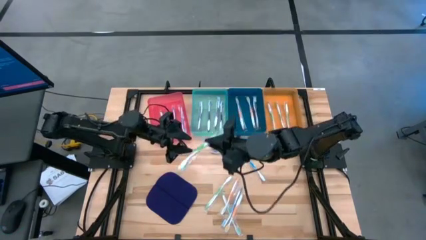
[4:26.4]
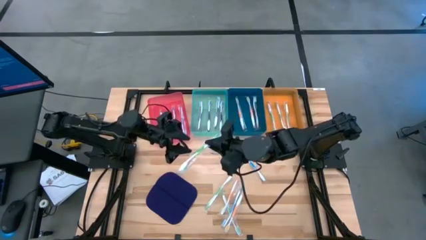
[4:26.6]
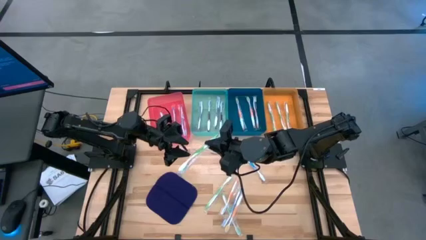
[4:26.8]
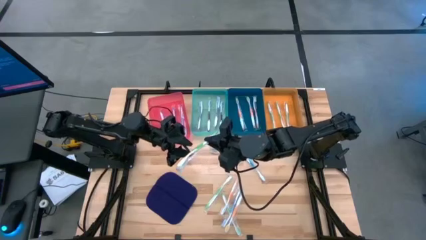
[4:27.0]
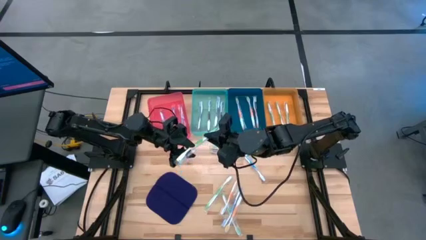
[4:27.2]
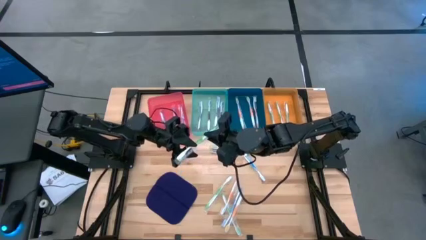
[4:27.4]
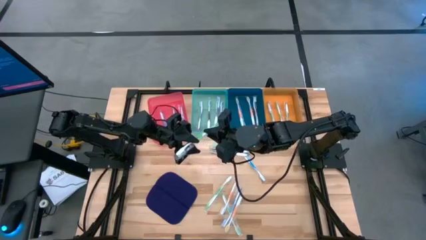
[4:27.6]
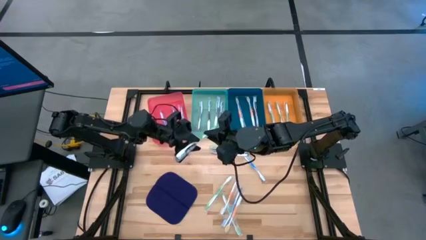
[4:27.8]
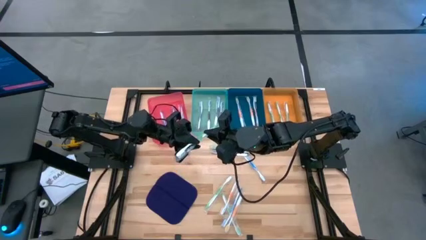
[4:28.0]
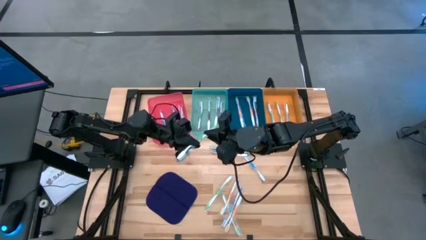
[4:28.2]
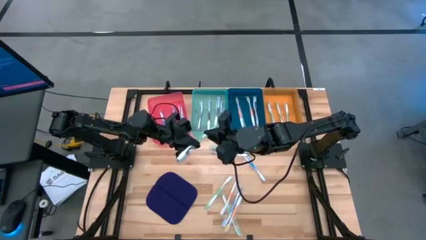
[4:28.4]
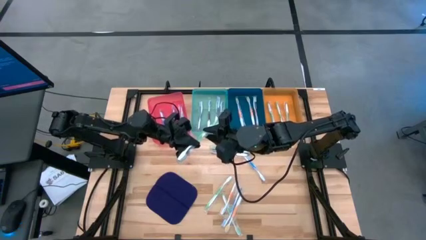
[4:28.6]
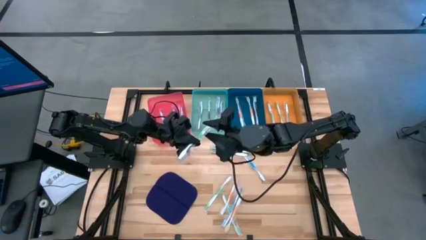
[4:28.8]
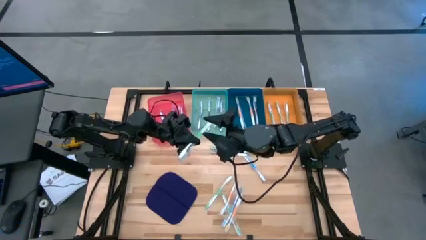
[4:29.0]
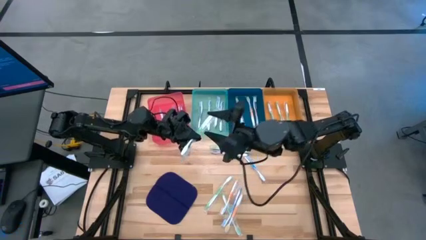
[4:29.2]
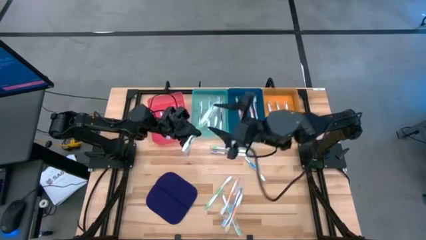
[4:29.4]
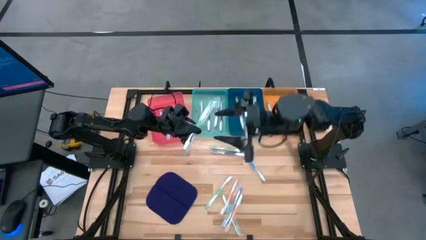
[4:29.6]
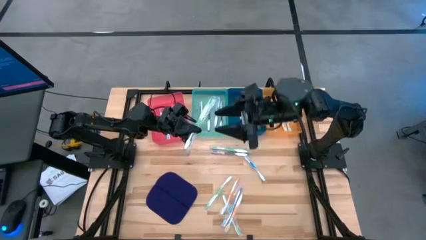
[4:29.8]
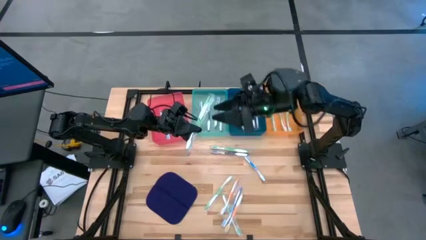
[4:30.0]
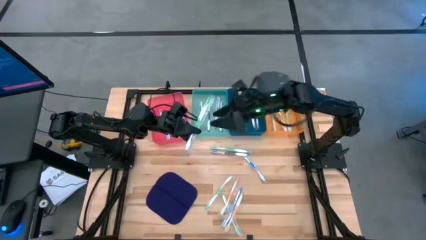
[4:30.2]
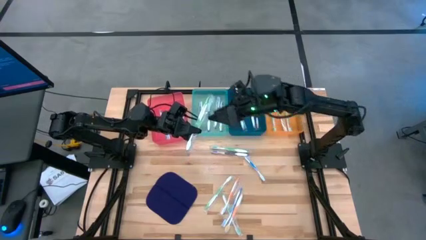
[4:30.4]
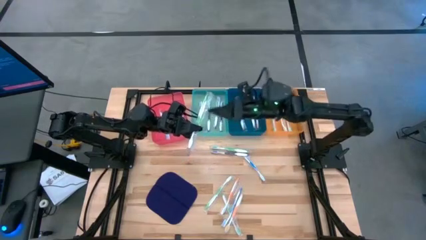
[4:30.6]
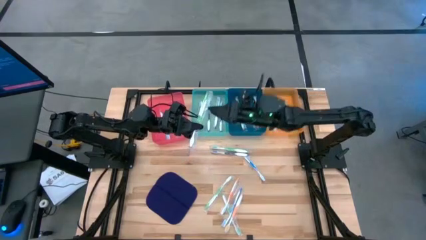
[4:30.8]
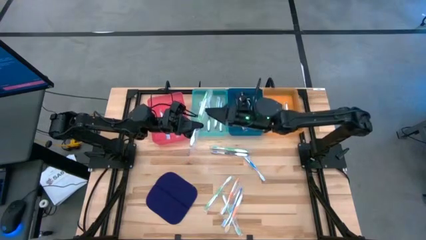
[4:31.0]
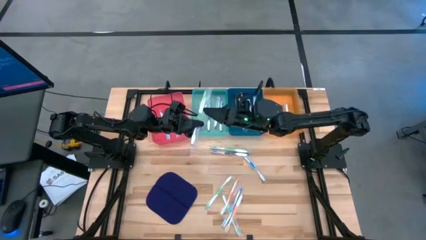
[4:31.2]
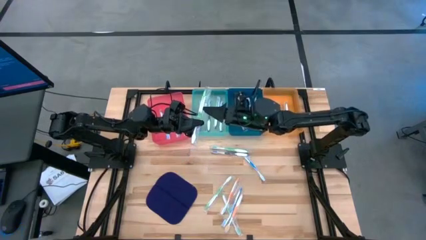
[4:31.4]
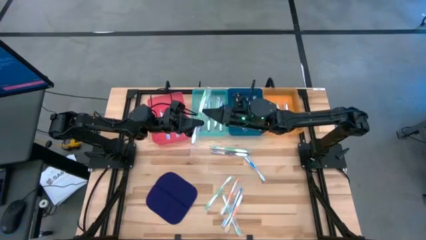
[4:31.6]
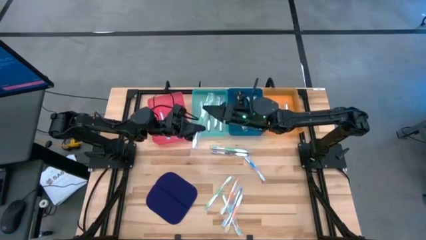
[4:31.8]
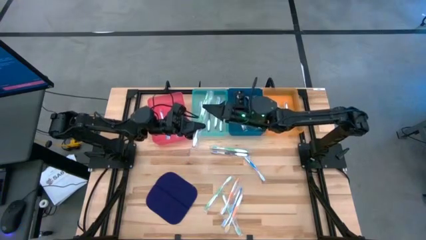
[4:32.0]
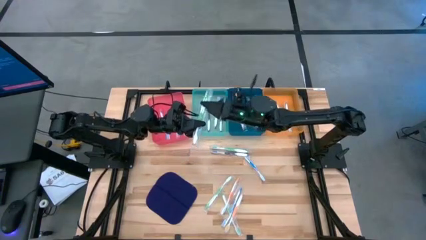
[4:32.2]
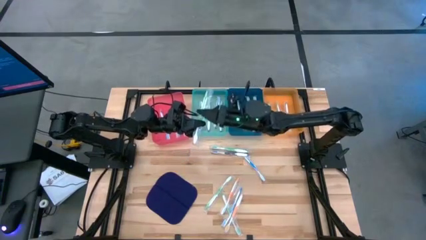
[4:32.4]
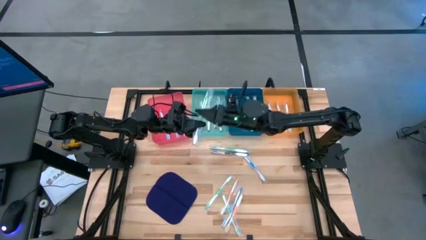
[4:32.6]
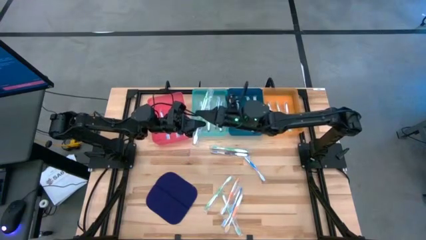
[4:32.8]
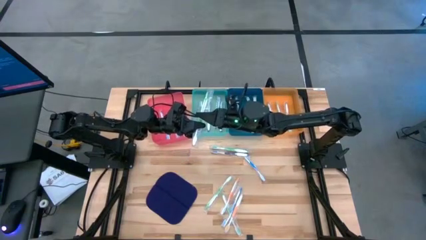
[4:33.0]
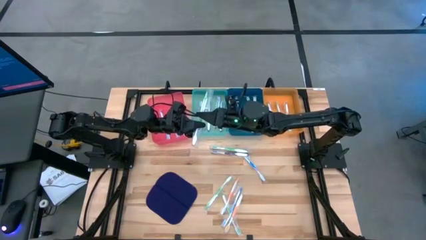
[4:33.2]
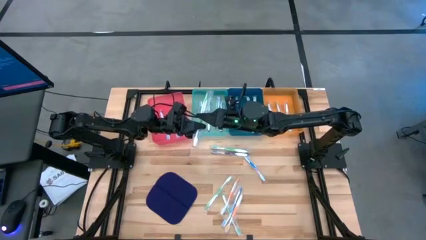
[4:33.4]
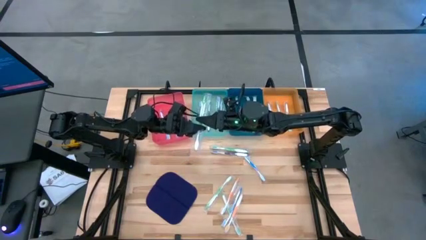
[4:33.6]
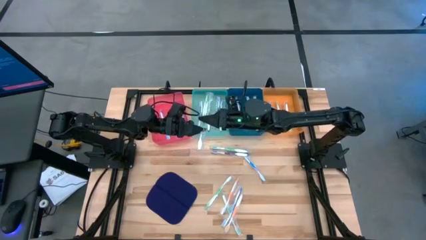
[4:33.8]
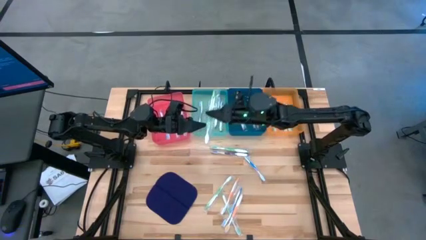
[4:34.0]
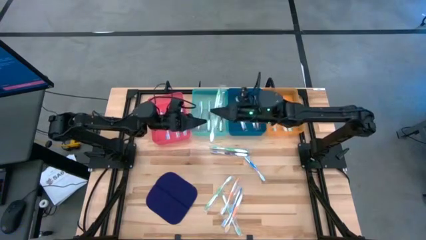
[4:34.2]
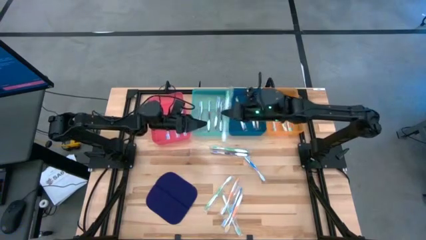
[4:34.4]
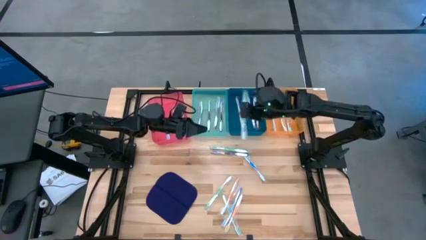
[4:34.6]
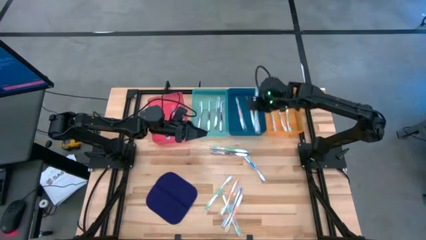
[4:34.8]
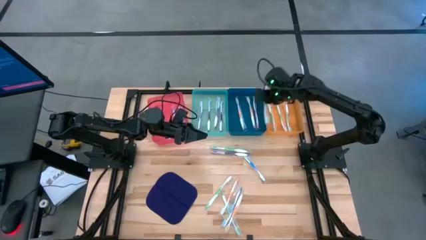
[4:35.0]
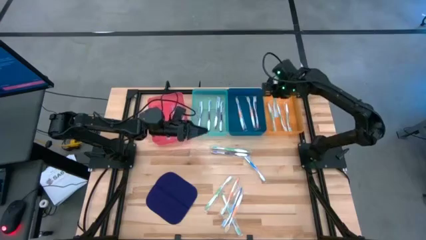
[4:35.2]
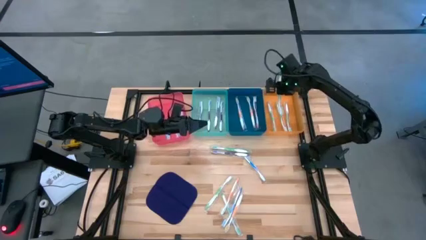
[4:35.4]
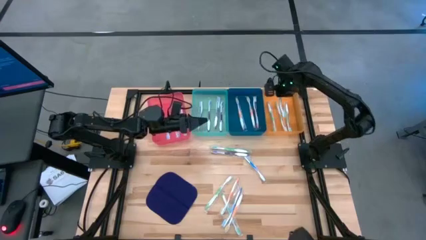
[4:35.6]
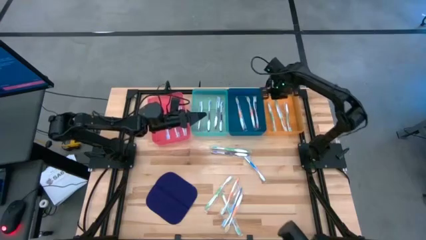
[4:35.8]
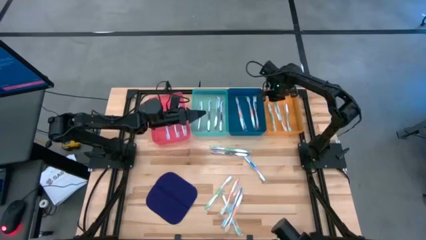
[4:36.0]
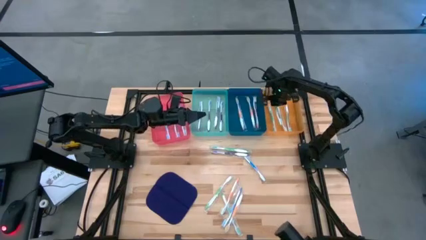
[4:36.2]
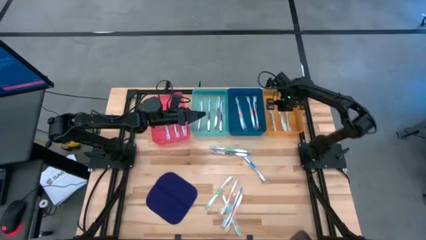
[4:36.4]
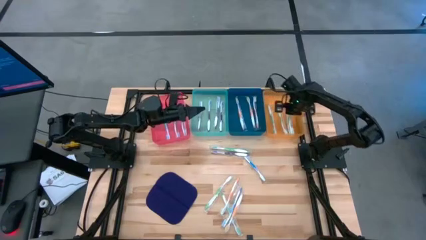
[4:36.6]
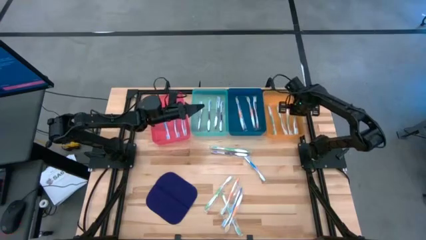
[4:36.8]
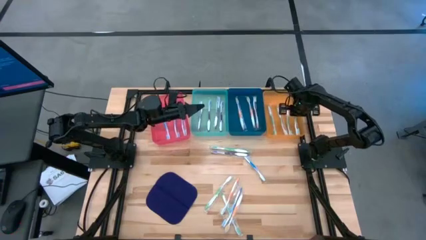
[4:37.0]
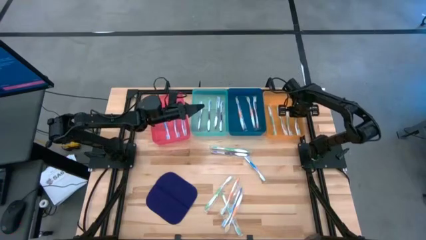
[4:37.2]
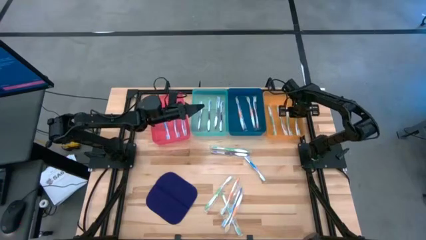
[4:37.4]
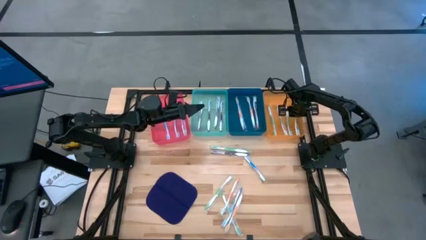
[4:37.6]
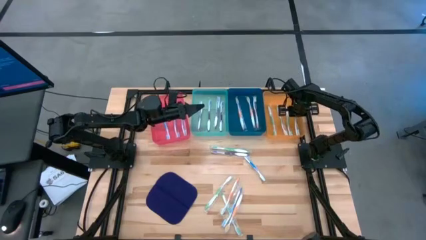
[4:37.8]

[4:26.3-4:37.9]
Task: Pick & Place Toothbrushes
Put the green toothbrush into the orange bin

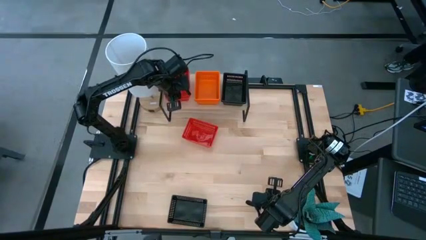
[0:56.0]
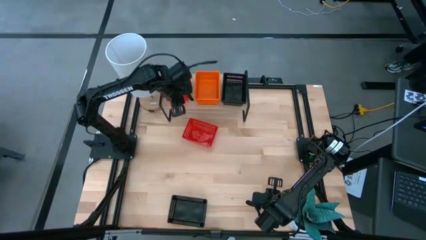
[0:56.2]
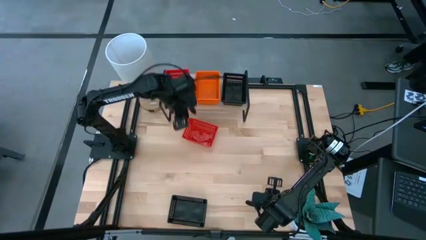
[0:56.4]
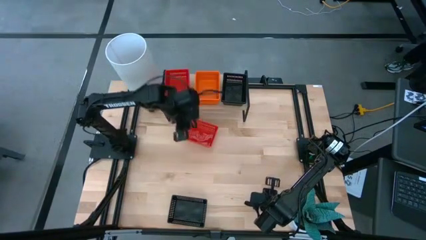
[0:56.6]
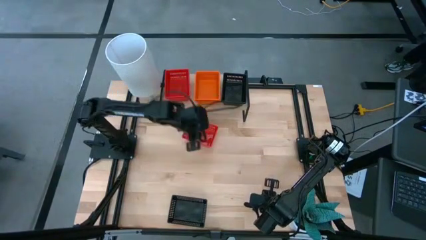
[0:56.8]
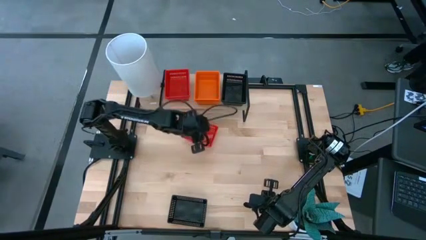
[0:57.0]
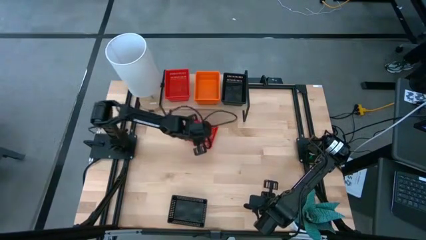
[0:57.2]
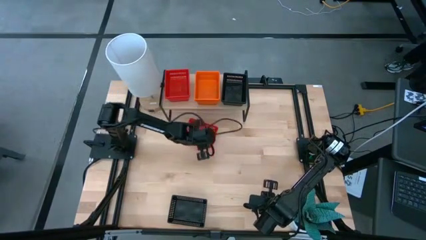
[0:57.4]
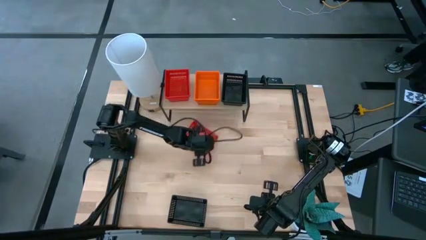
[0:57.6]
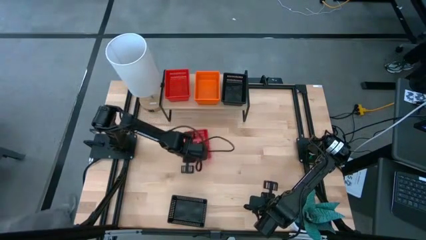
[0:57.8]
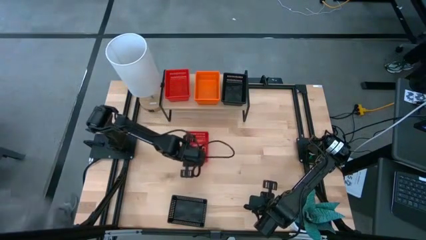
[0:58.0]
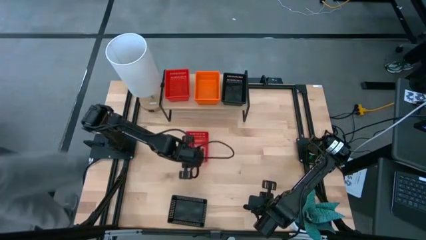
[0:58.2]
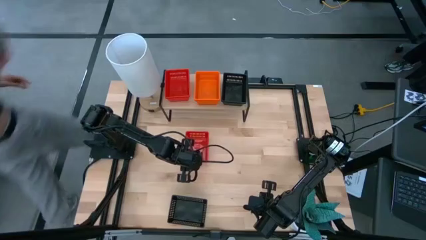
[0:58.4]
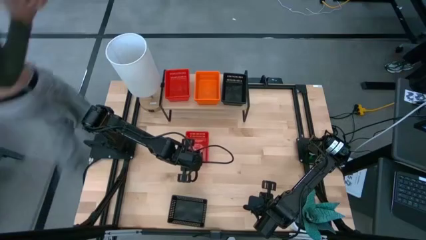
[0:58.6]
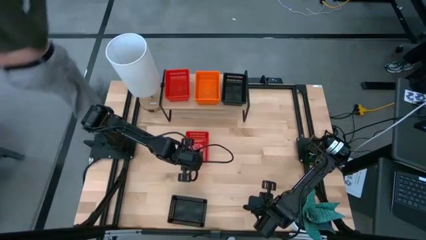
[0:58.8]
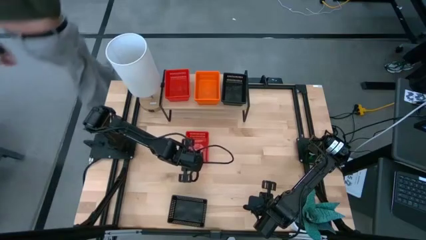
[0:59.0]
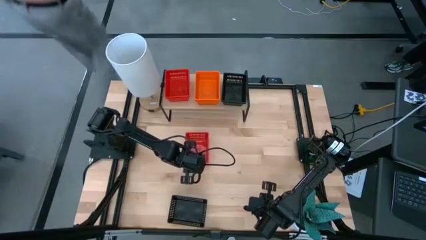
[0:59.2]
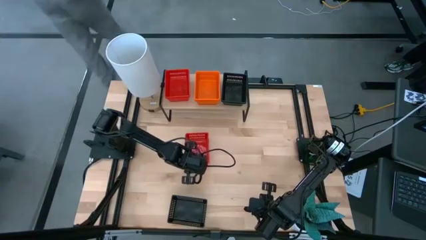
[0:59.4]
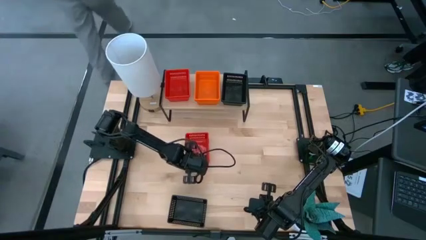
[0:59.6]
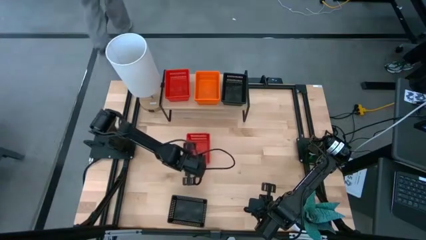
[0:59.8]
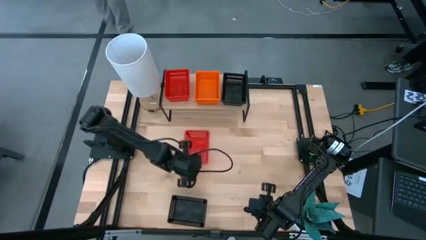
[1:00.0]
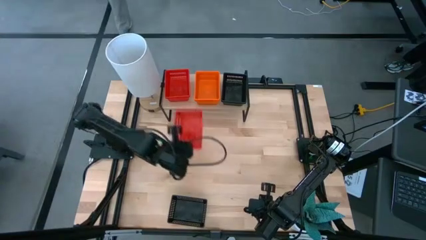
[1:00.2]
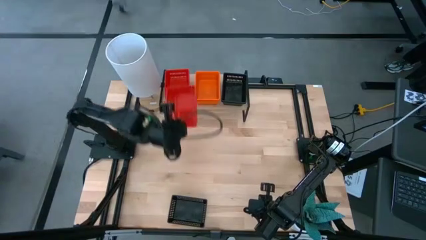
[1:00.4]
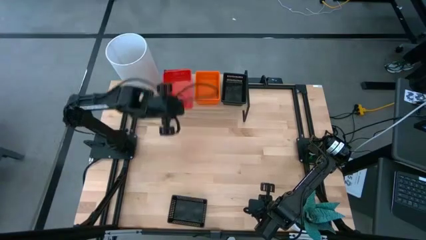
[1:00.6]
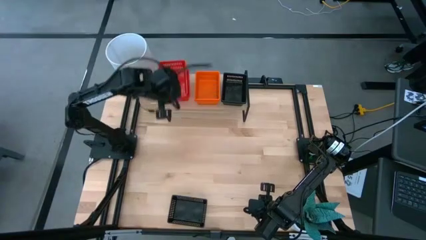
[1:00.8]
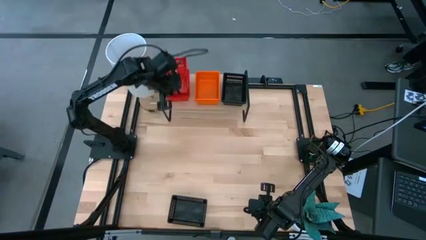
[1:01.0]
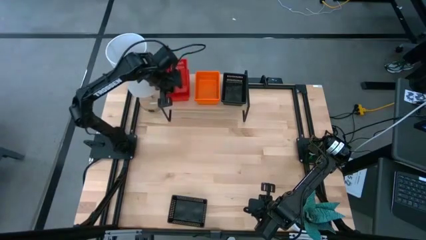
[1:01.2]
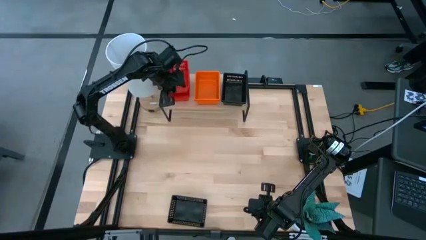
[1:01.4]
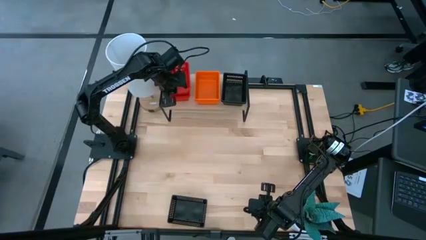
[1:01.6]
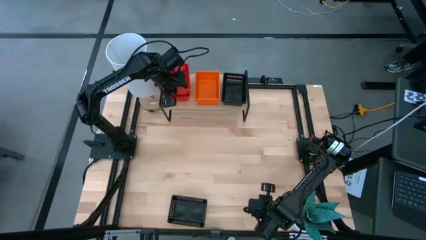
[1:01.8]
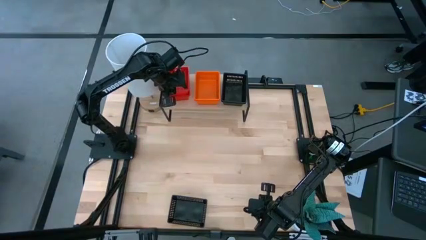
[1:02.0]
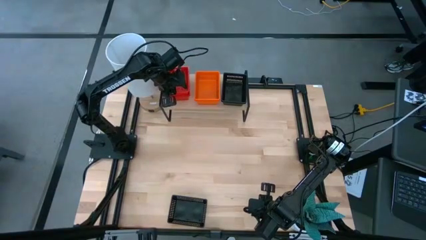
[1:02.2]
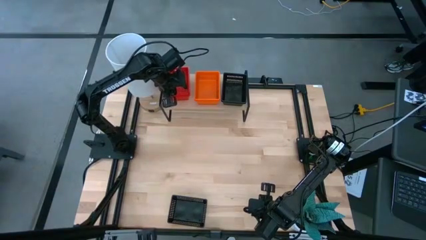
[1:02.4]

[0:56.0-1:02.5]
Task: Stack baskets on shelf by color
Stack the red bin on the red bin on the shelf
